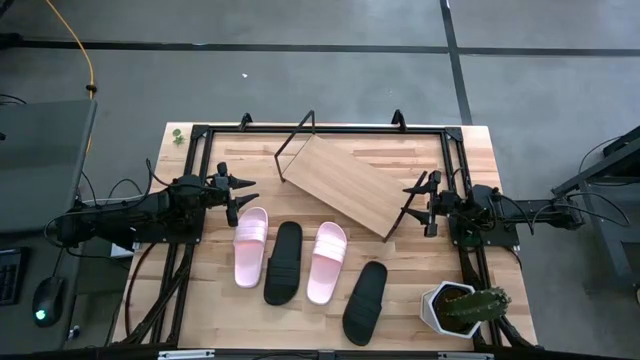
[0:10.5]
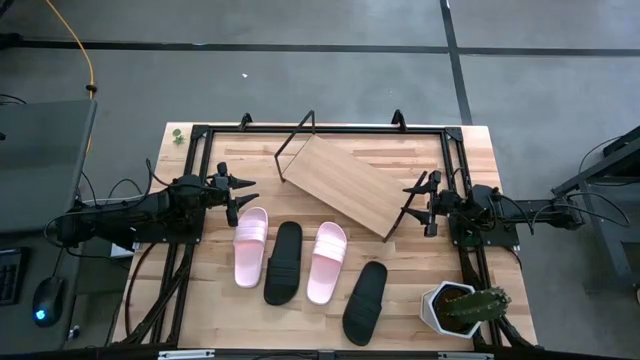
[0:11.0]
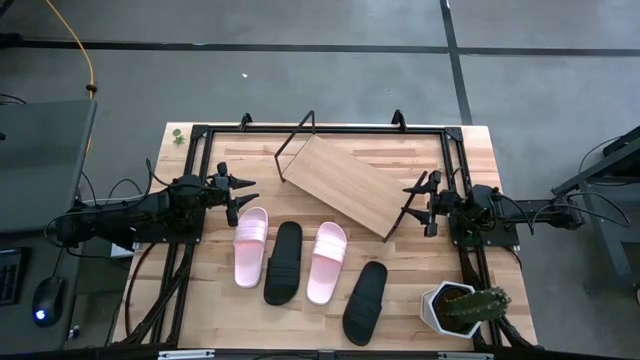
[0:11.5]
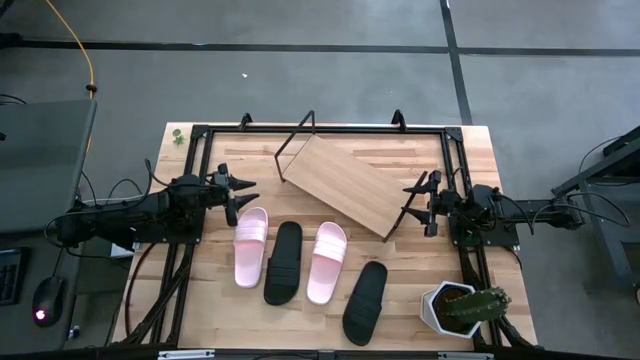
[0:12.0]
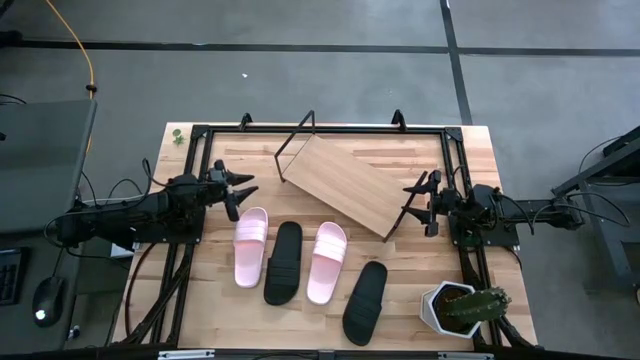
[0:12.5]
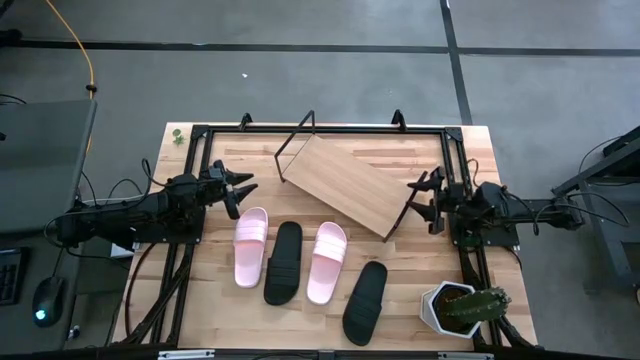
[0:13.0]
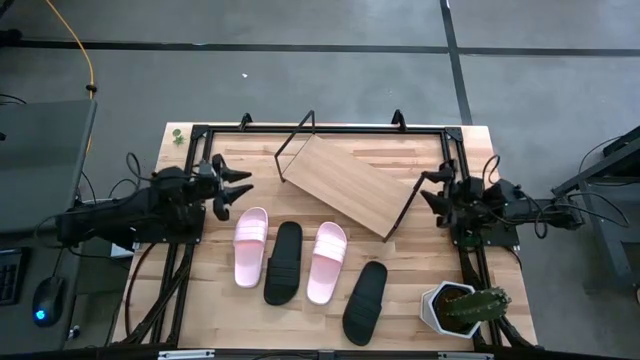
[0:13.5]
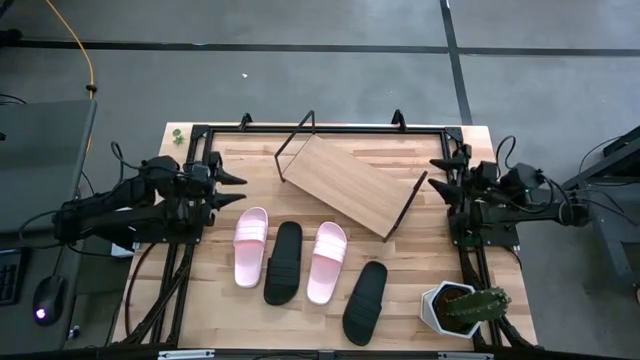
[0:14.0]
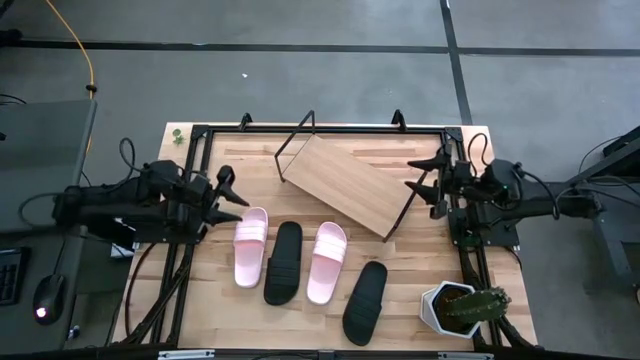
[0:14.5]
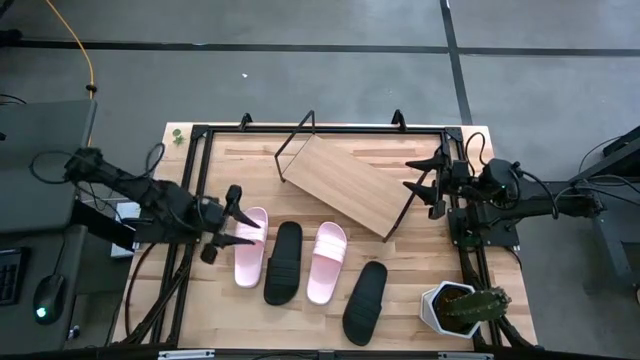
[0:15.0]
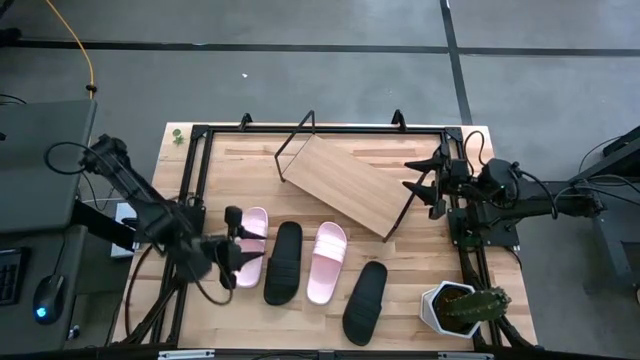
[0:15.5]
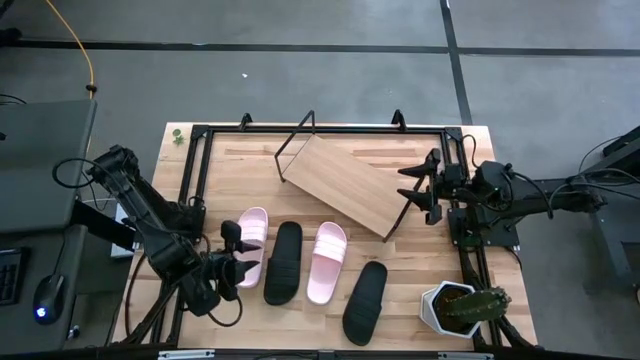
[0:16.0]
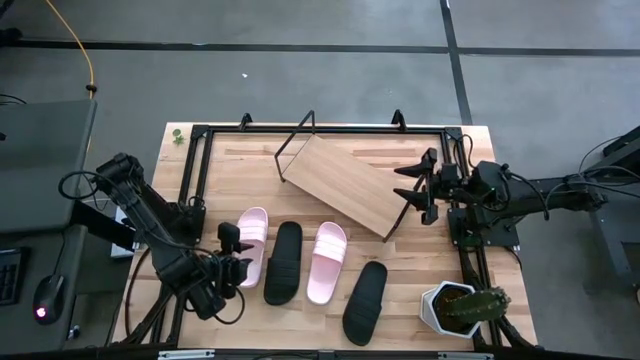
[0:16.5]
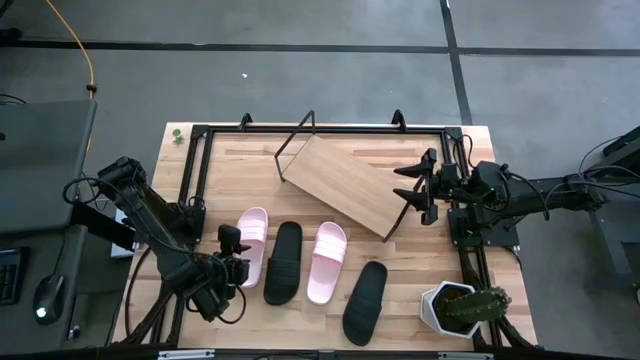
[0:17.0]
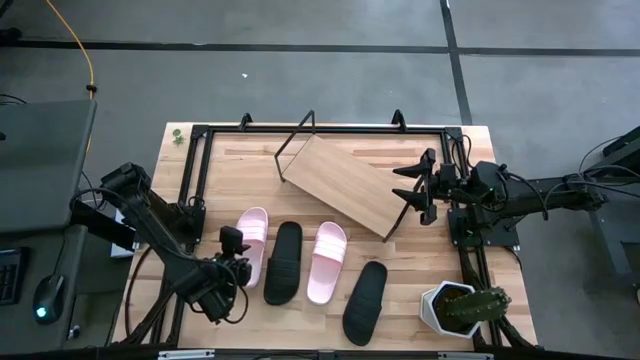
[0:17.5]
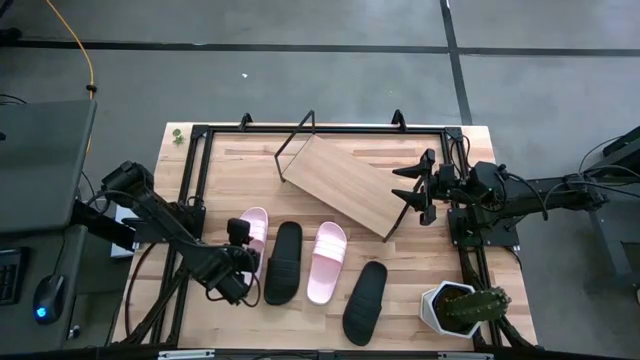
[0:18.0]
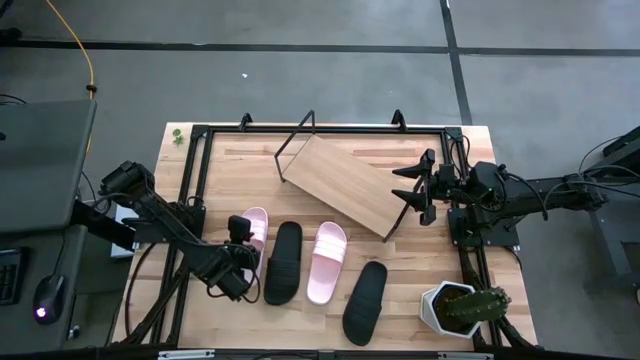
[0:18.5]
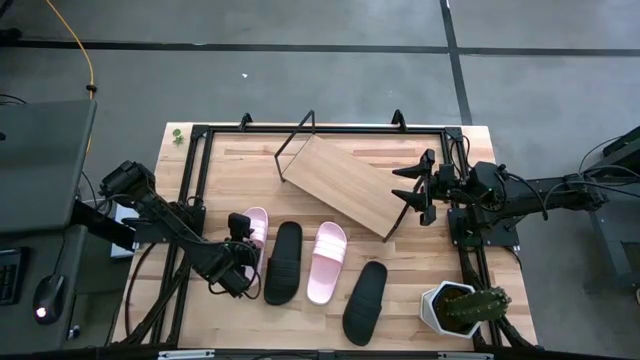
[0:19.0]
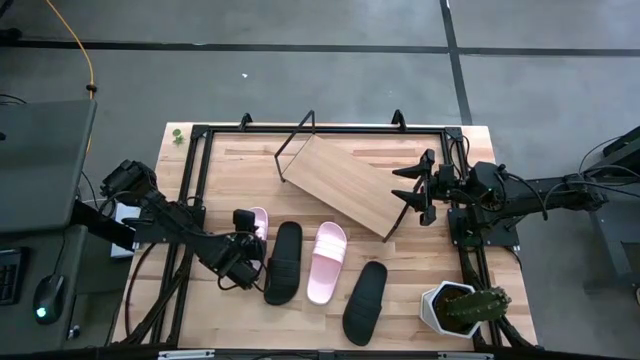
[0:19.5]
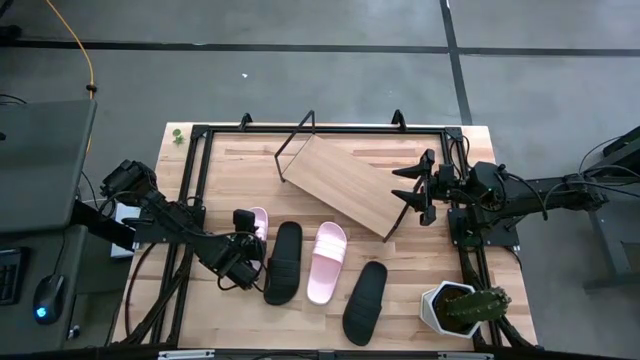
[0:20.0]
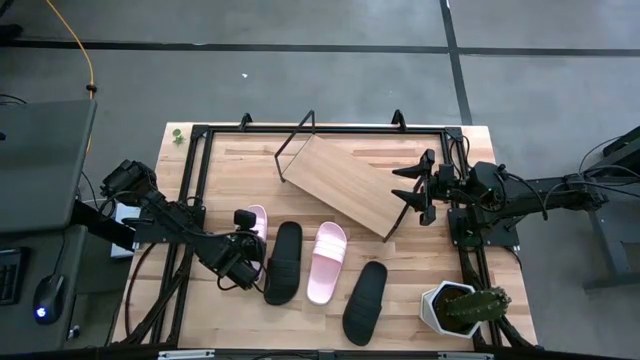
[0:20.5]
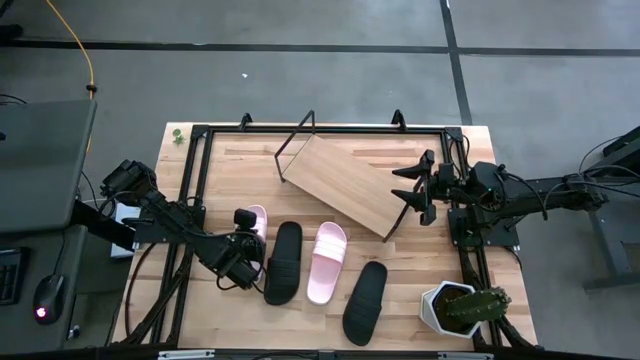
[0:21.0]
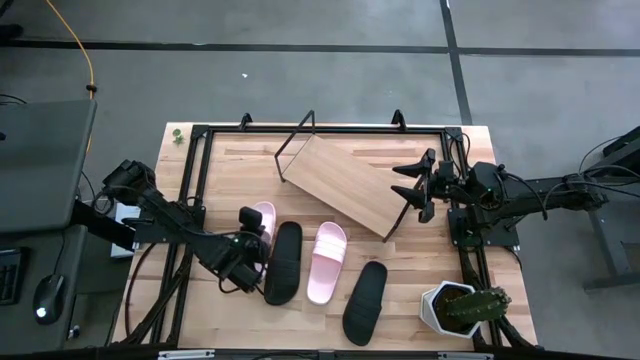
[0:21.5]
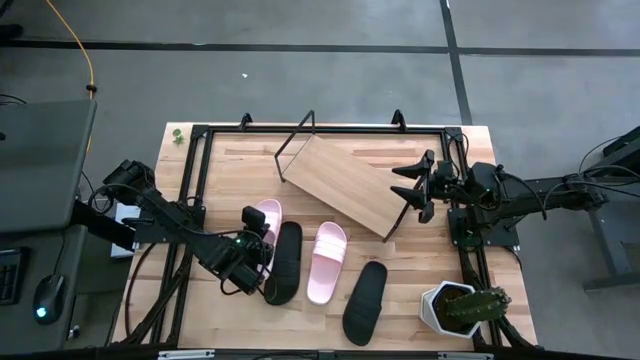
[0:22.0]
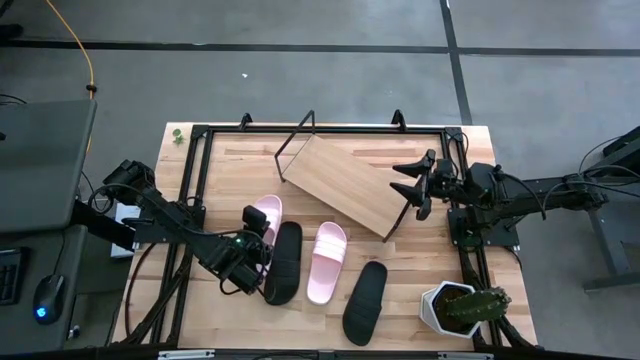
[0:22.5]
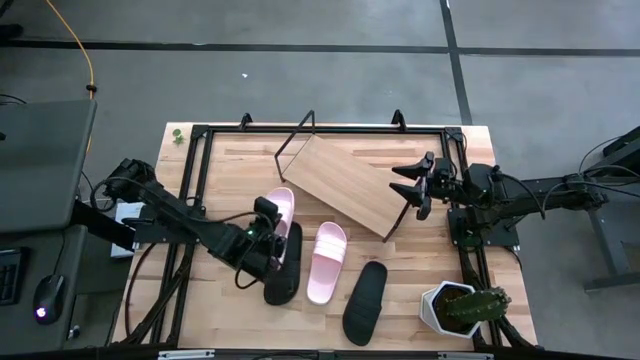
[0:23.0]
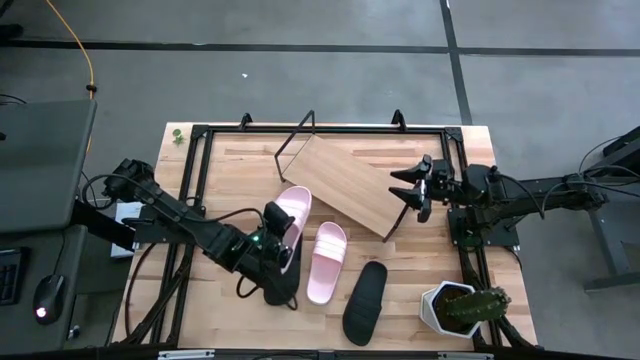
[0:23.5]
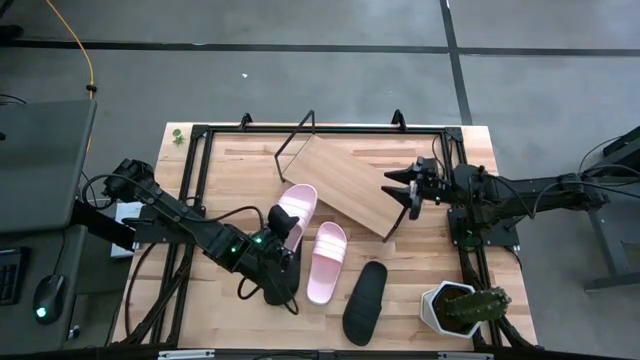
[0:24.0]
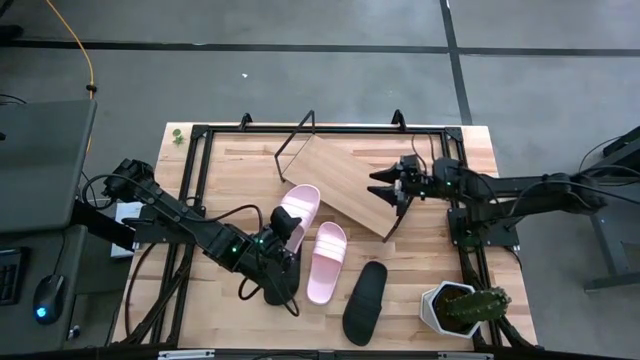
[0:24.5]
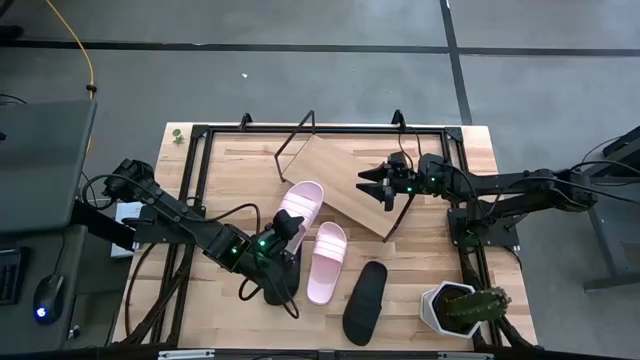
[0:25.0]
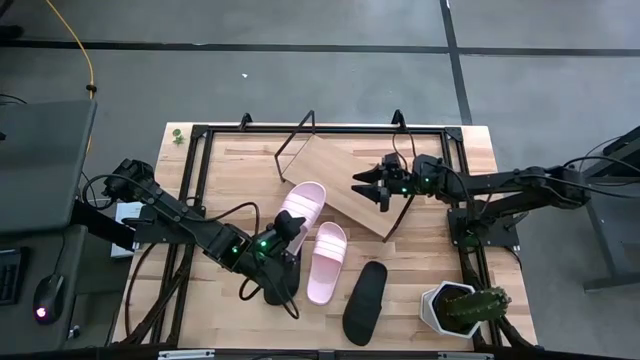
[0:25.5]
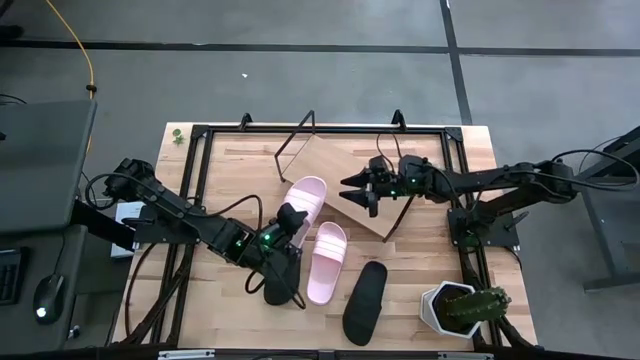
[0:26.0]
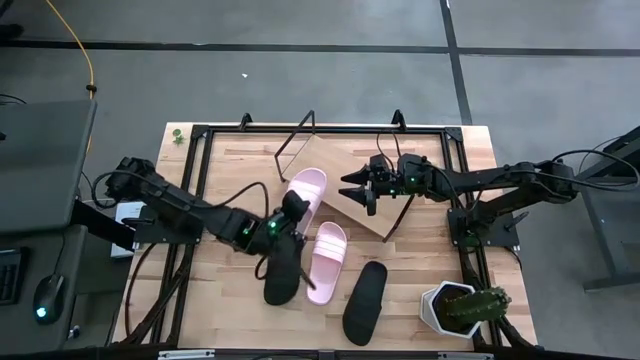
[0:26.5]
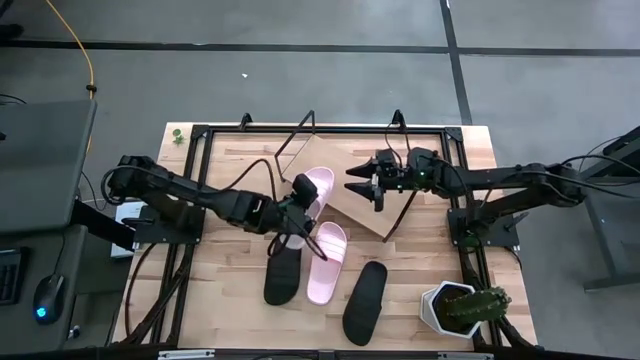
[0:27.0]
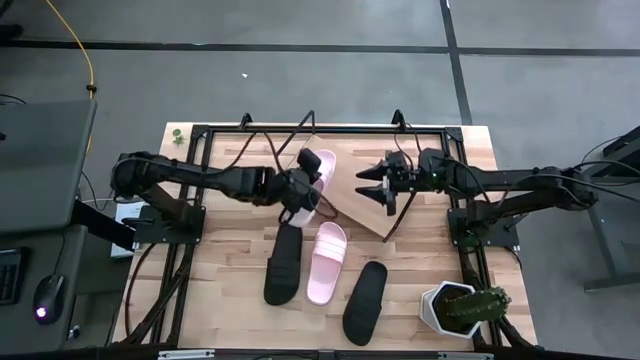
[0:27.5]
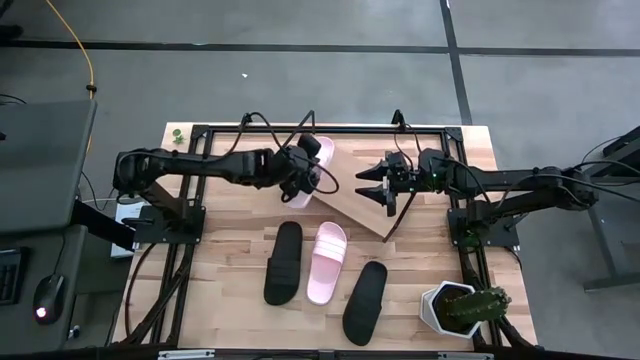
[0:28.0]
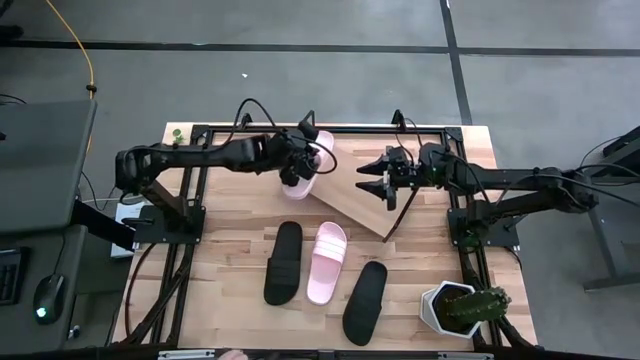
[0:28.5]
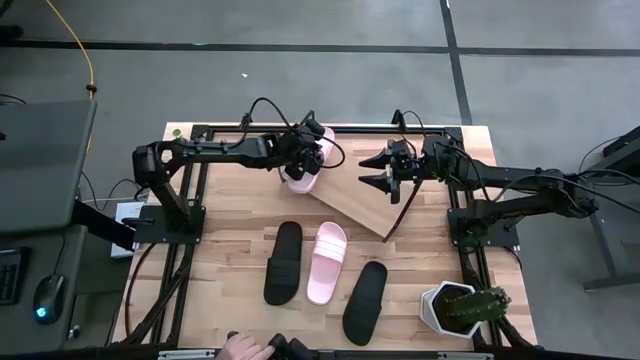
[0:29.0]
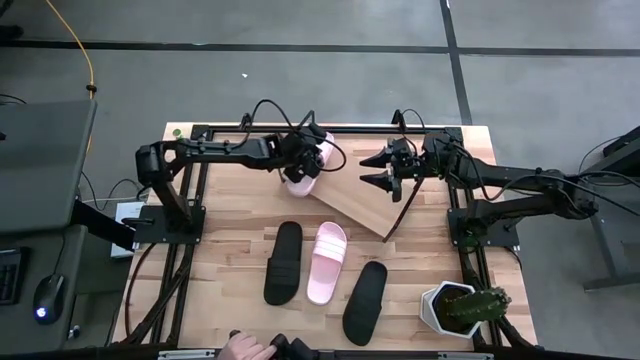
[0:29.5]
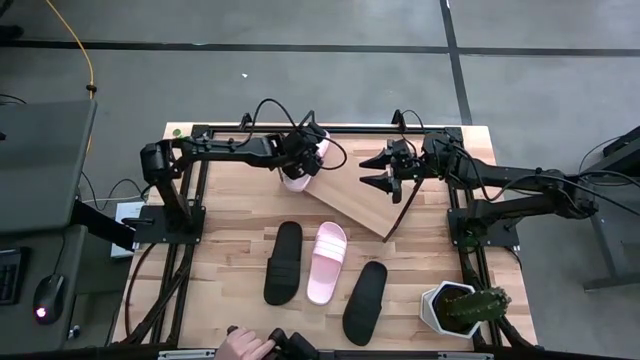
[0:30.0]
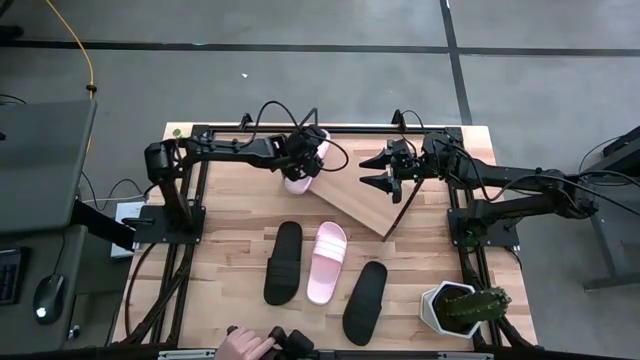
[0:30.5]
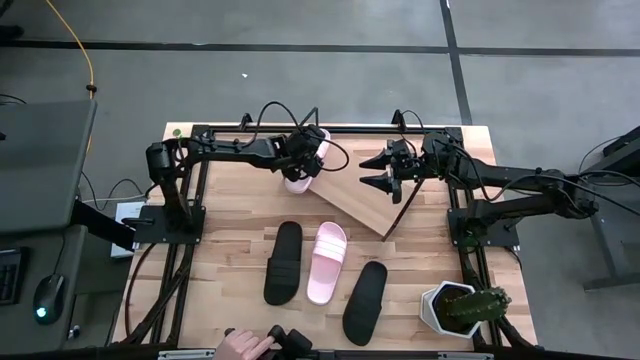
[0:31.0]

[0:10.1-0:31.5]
Task: Pick and place slides into the shelf
Put the left pink slipper on the shelf

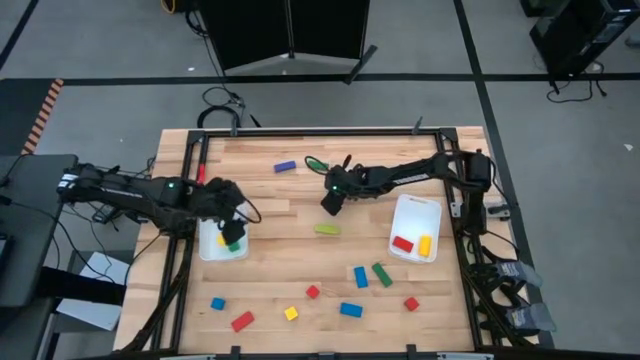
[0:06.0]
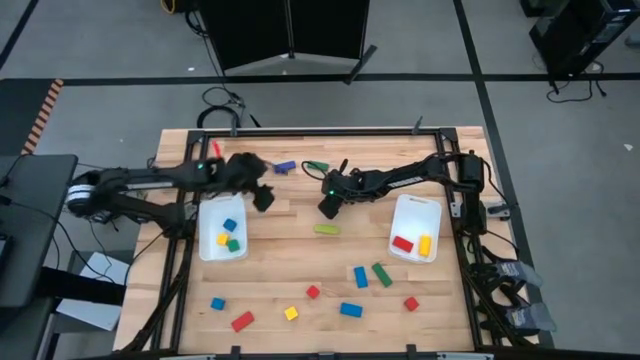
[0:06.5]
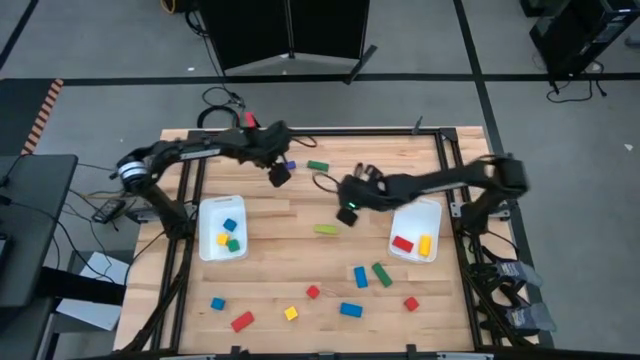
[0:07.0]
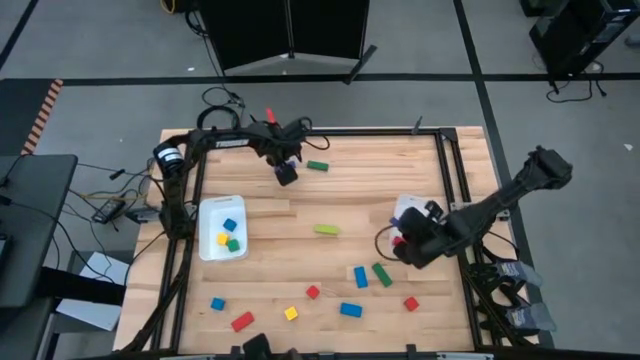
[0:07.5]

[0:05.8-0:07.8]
Task: Sort blocks by size
Put the blue game piece in the right bin
